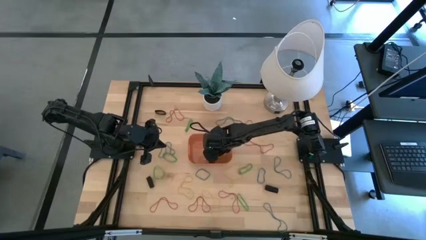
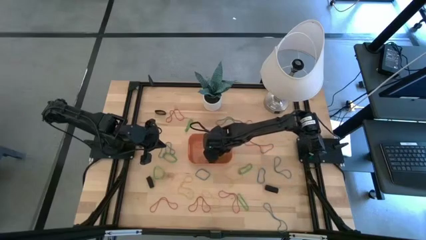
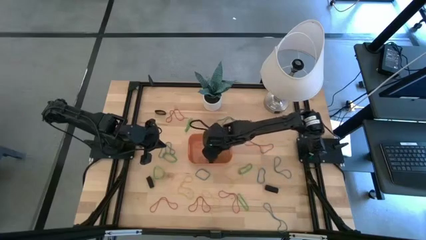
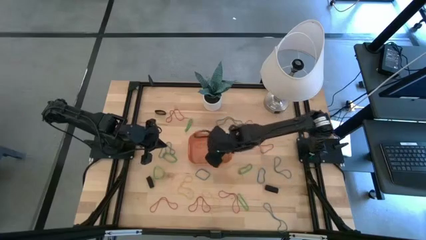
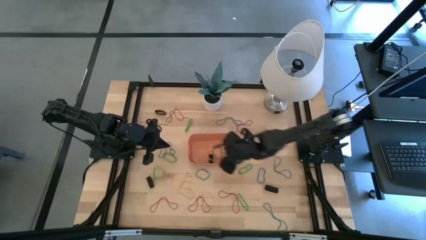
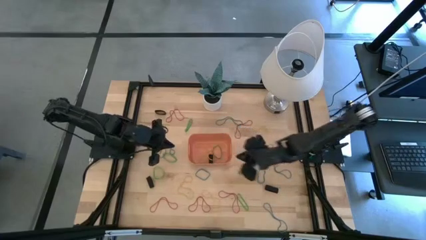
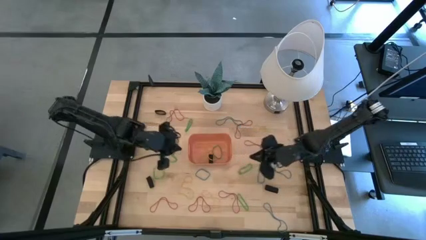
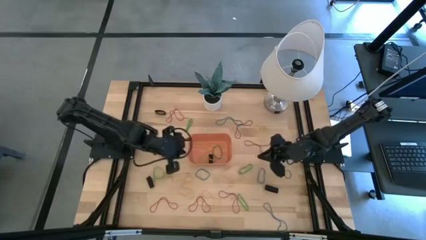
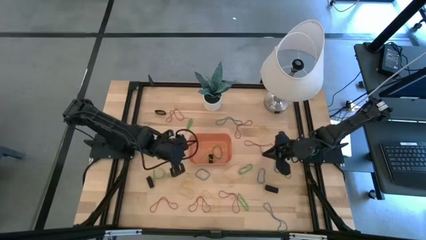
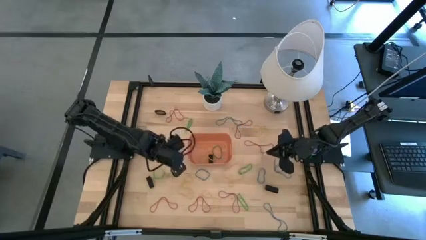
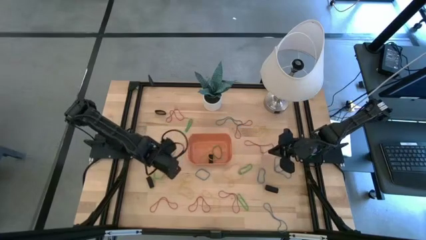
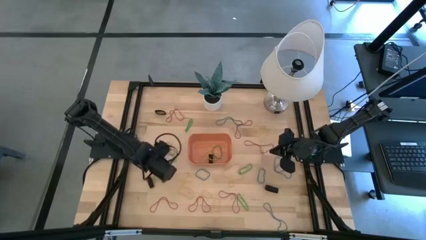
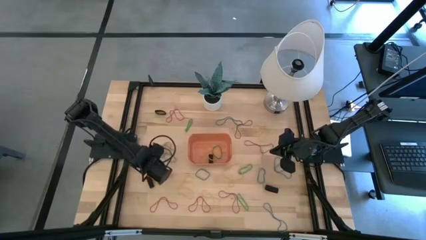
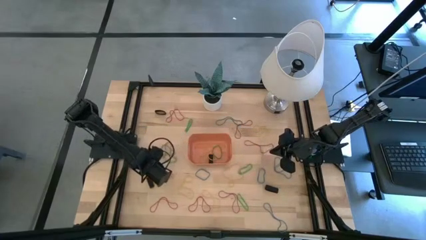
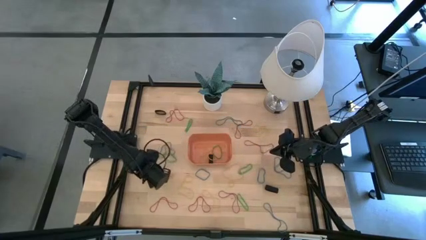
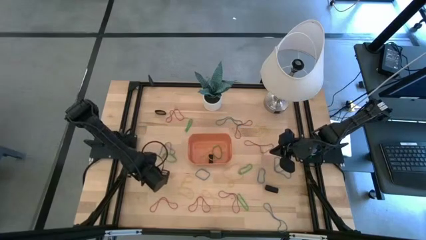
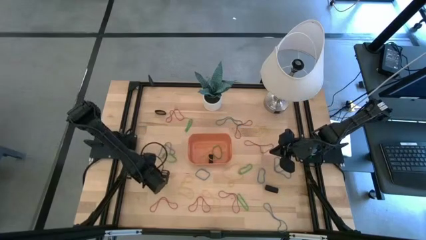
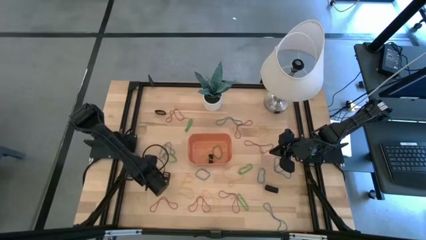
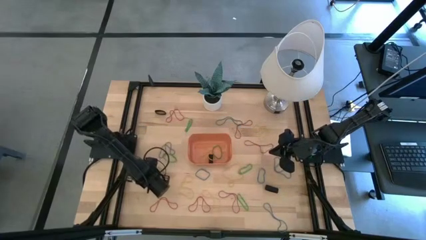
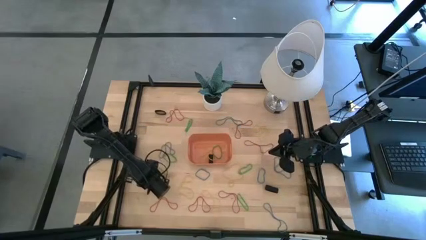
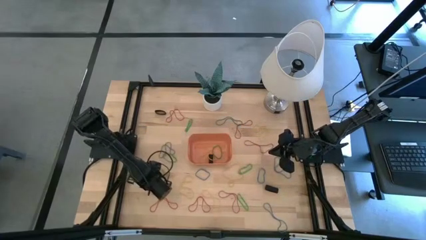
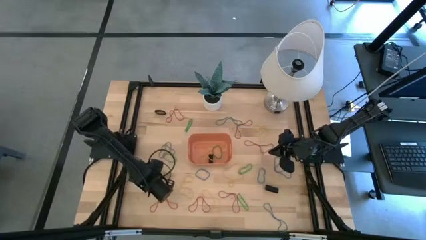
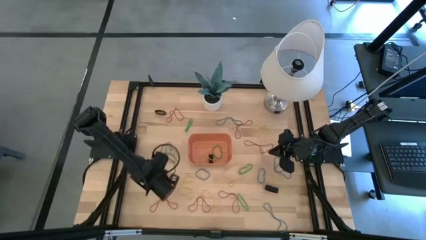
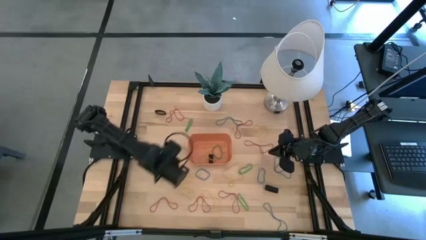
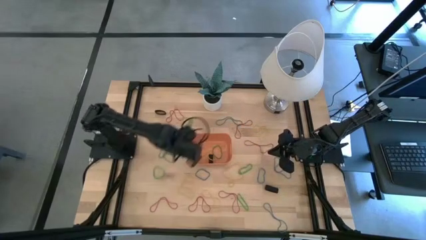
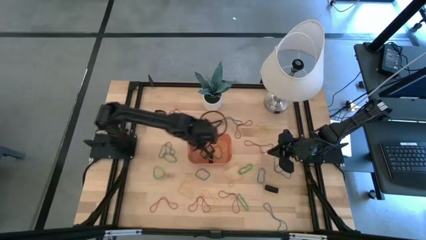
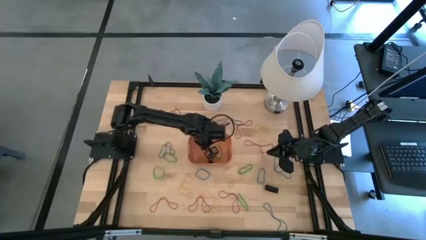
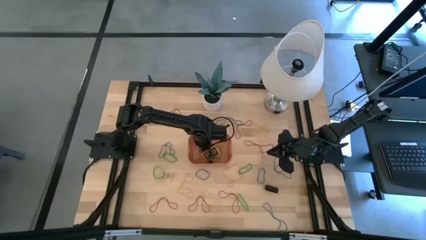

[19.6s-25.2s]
Task: Pick and place rubber bands into bin
Put the black rubber band into the orange bin

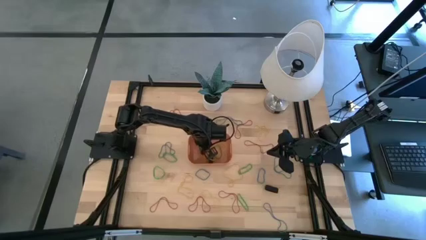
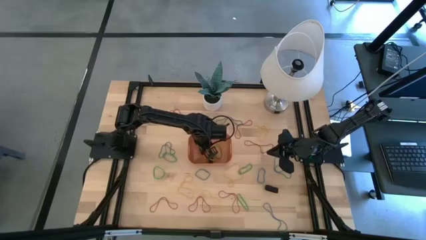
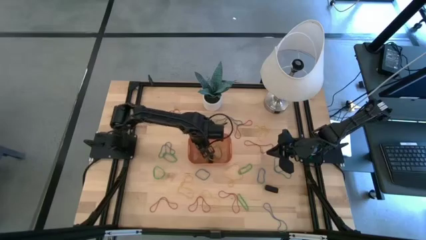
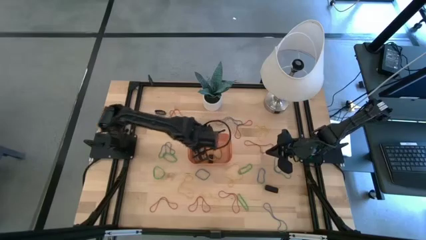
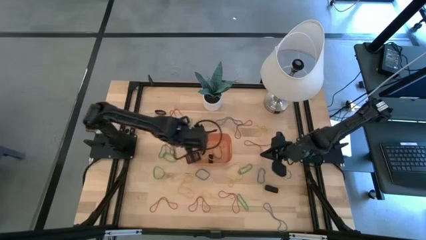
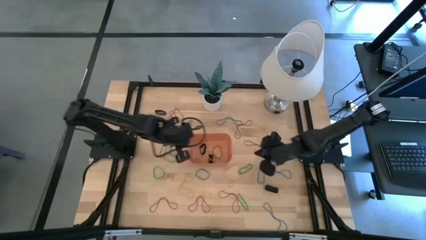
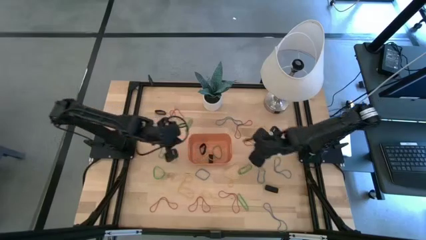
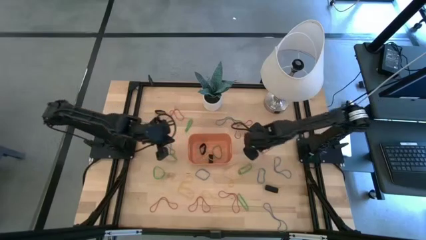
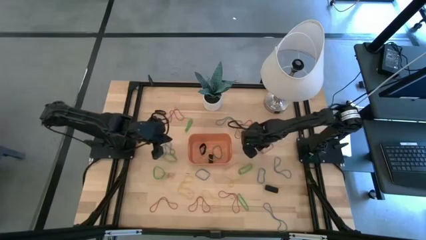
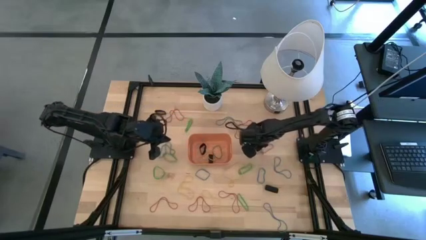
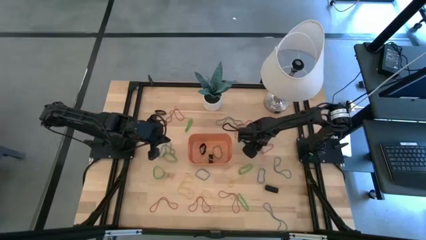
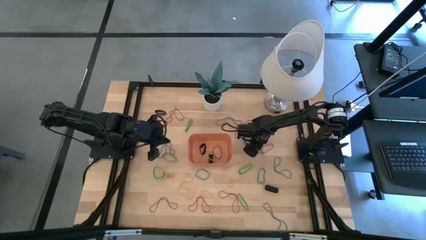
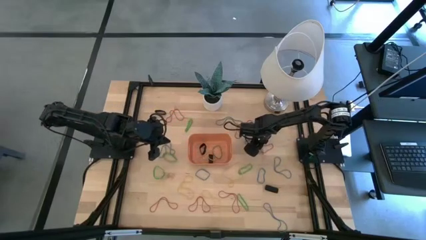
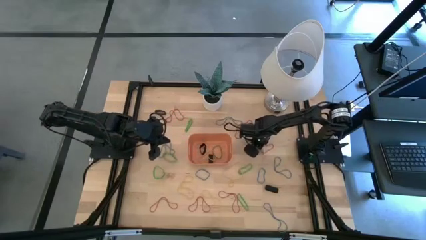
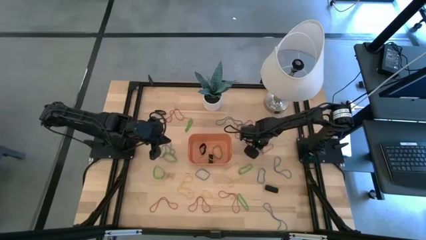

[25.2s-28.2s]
Put the red rubber band into the orange bin

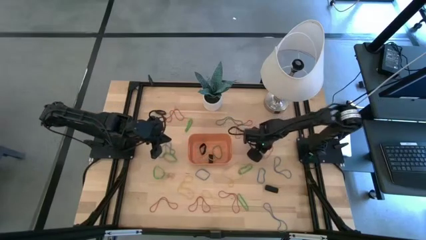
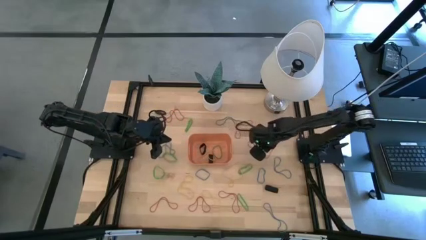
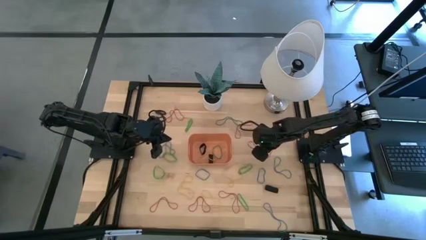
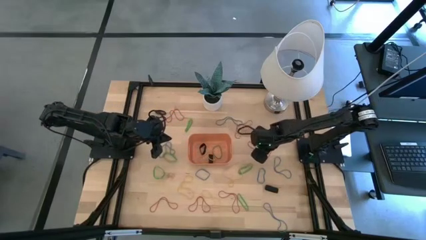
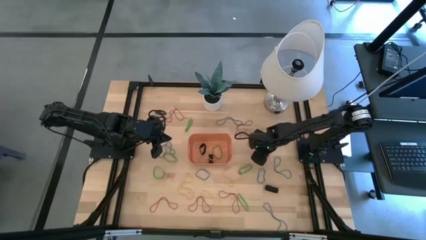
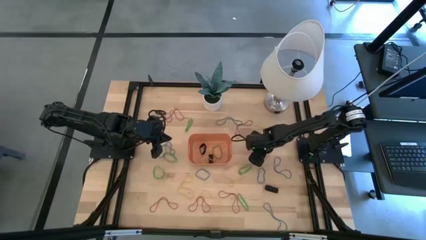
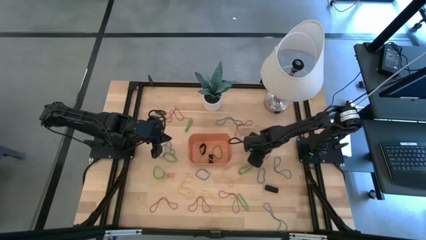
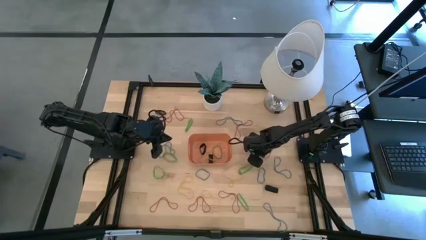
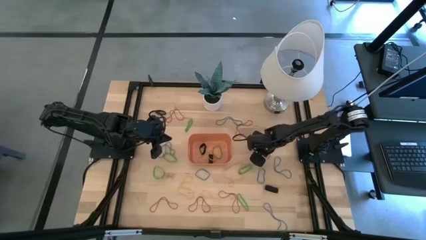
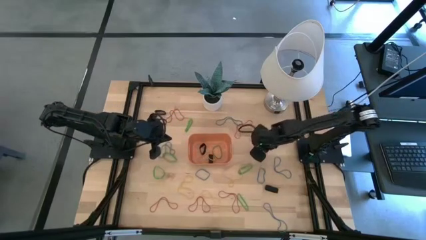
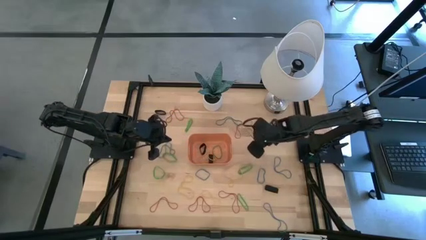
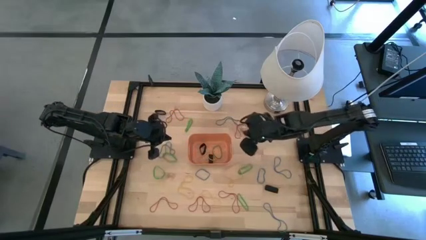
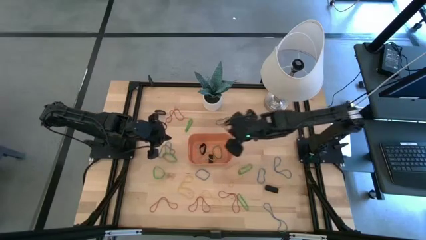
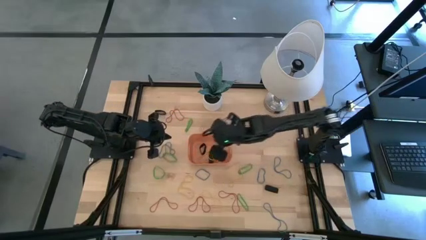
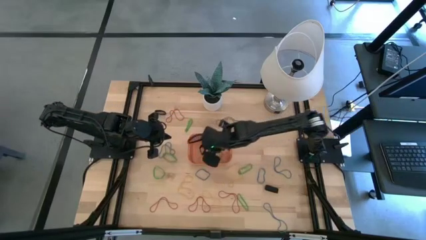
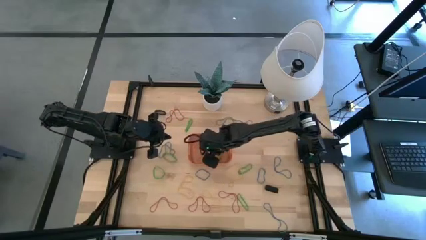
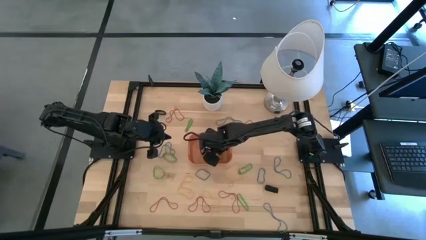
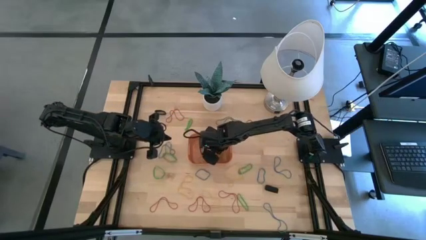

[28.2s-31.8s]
Put the red rubber band into the orange bin

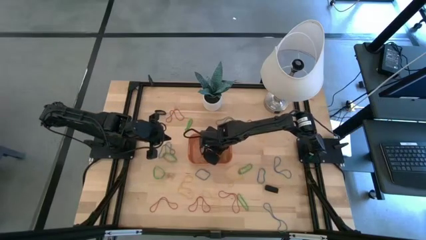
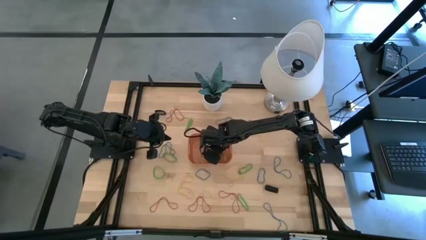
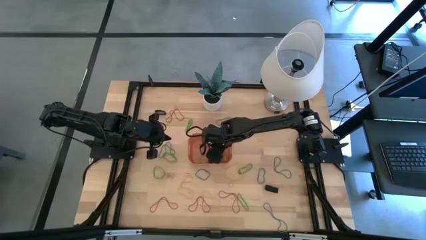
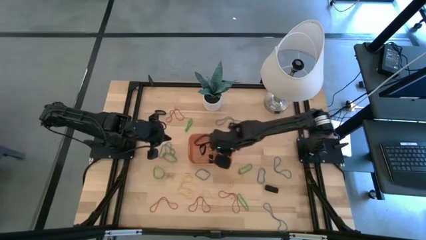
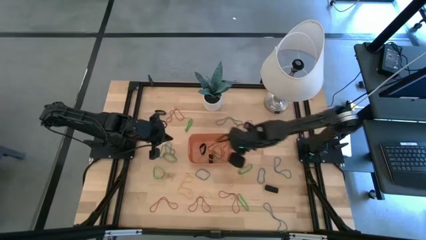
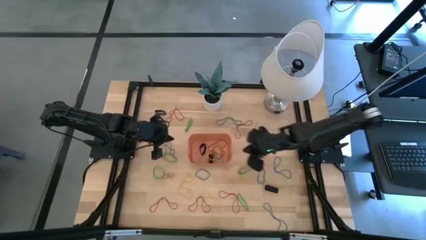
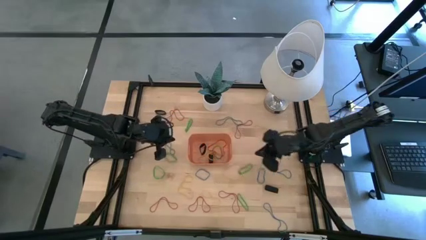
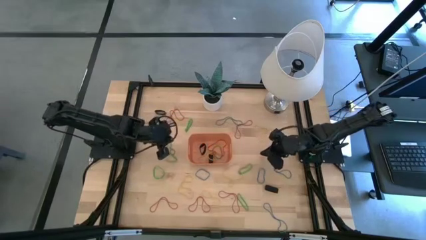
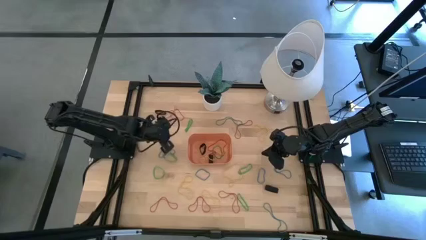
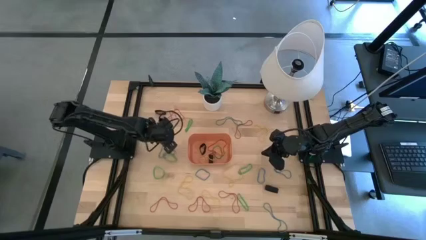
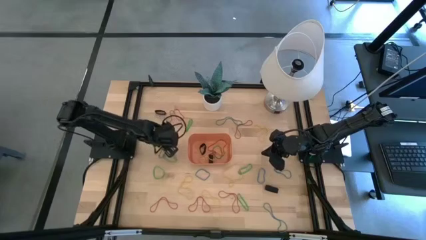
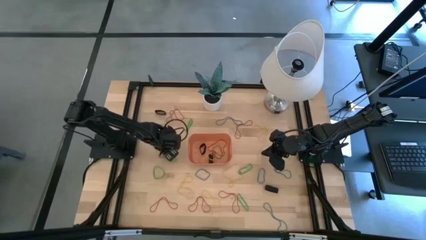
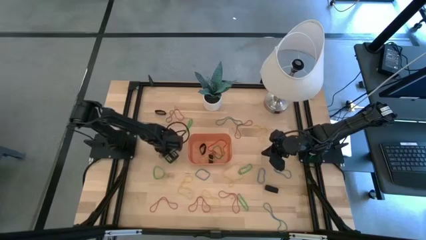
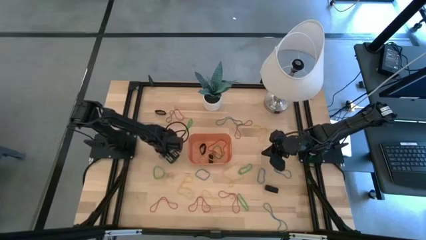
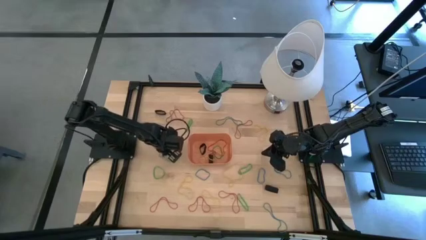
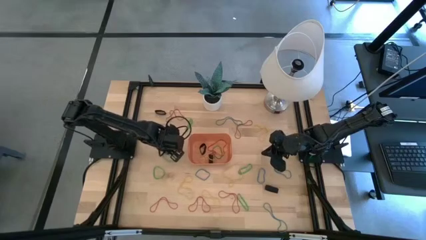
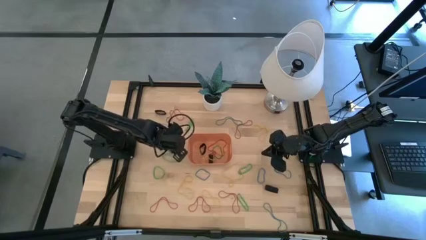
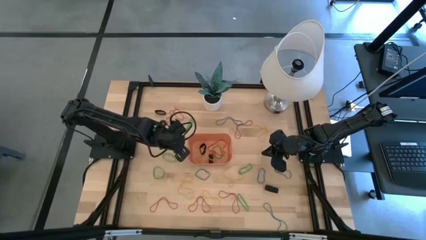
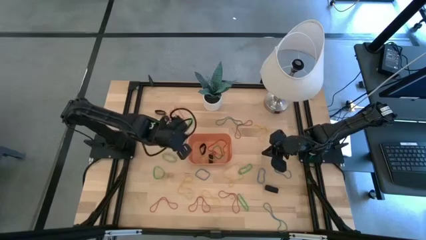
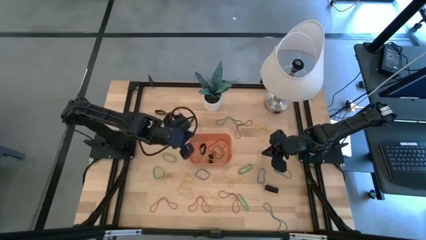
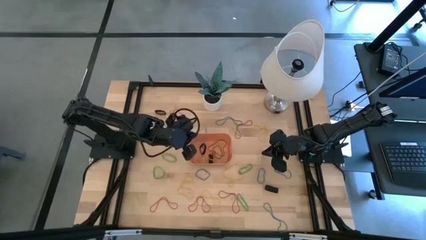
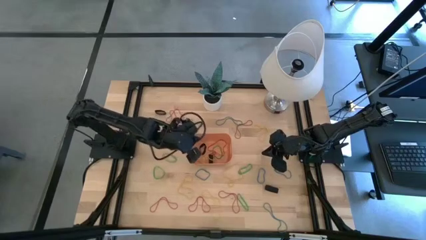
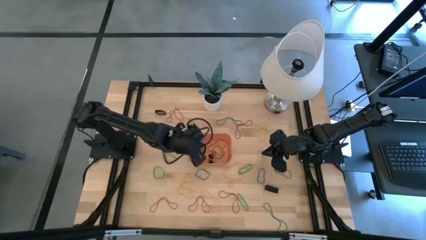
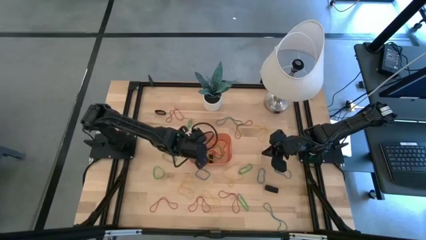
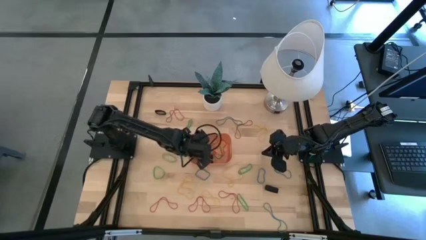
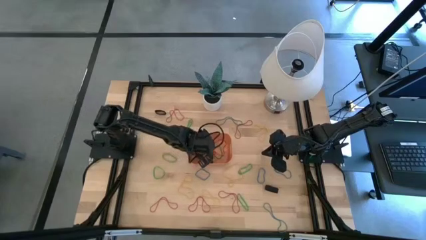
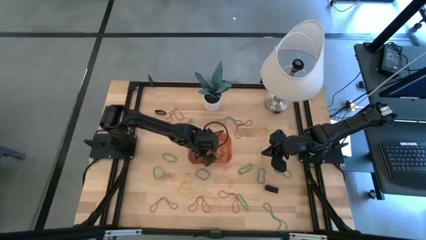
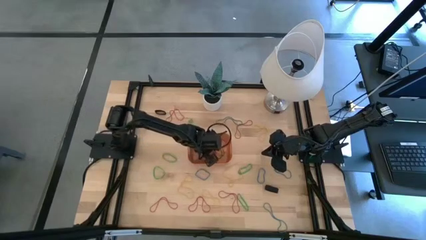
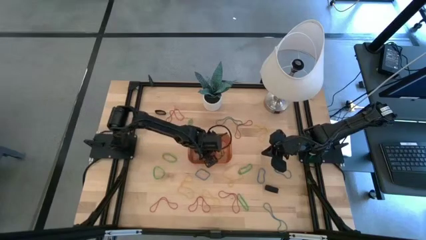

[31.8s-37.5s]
Put the blue rubber band into the orange bin
